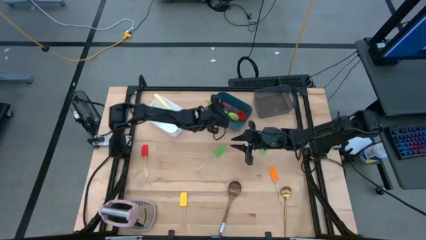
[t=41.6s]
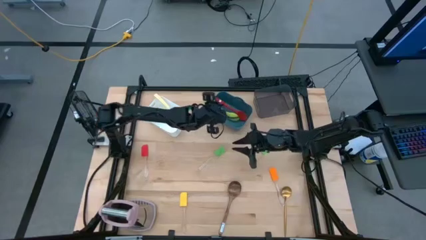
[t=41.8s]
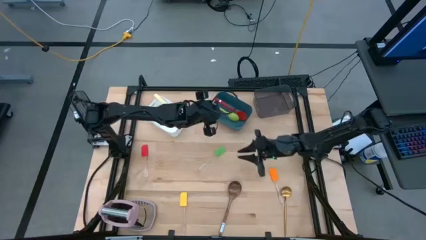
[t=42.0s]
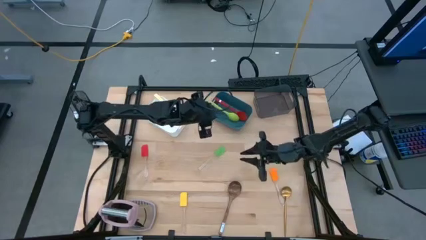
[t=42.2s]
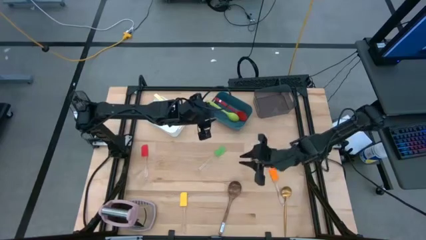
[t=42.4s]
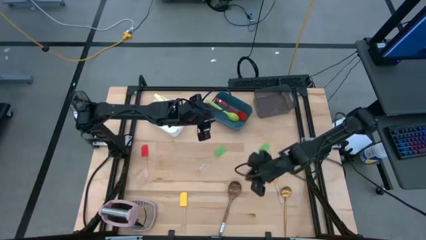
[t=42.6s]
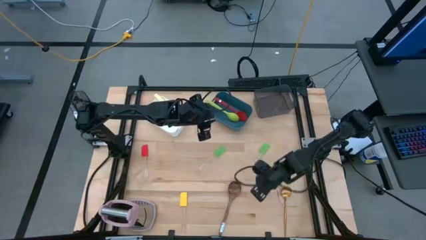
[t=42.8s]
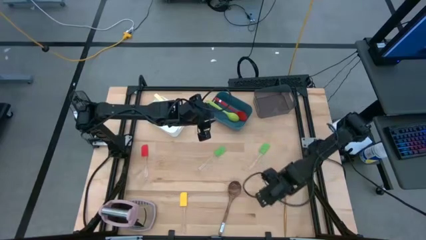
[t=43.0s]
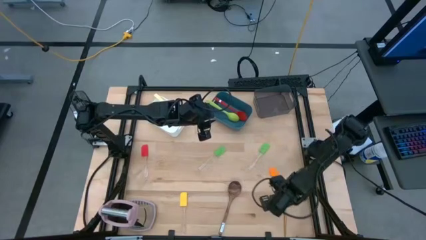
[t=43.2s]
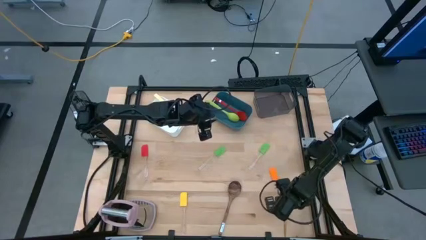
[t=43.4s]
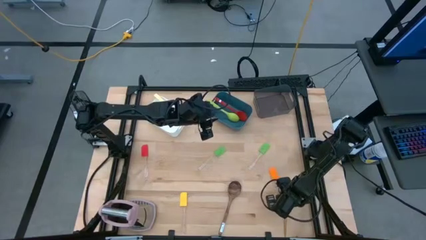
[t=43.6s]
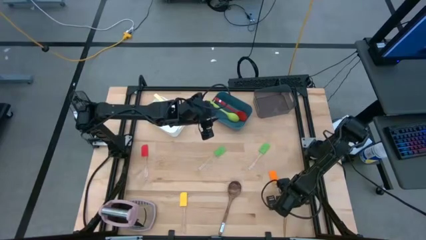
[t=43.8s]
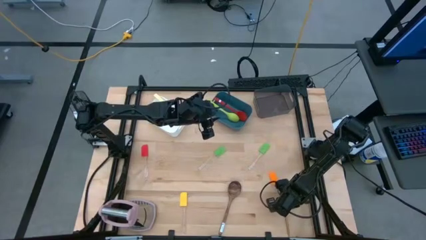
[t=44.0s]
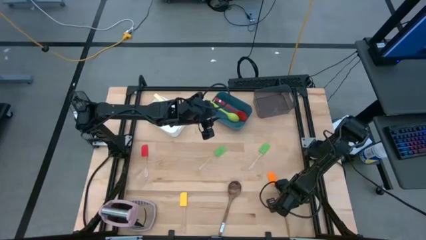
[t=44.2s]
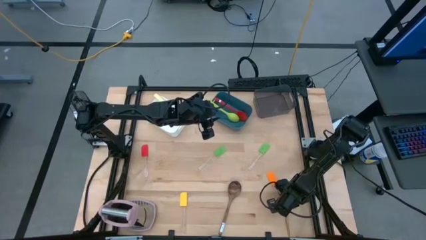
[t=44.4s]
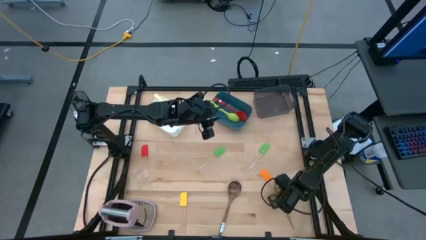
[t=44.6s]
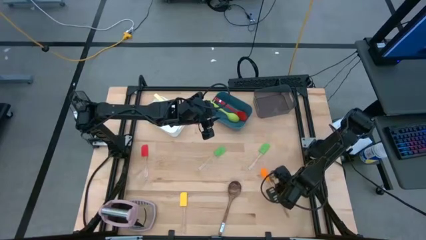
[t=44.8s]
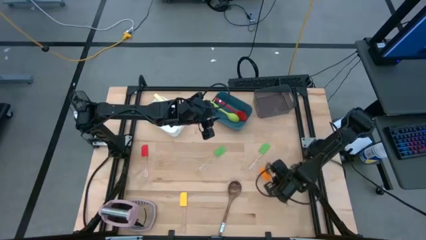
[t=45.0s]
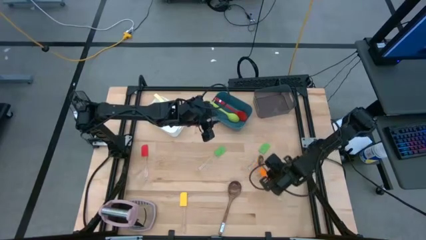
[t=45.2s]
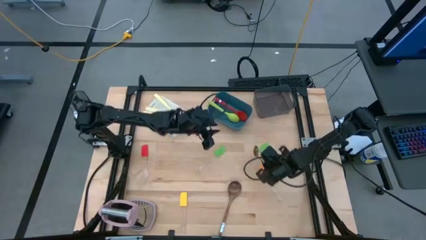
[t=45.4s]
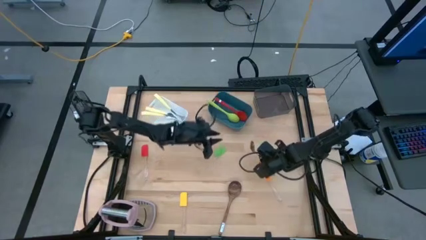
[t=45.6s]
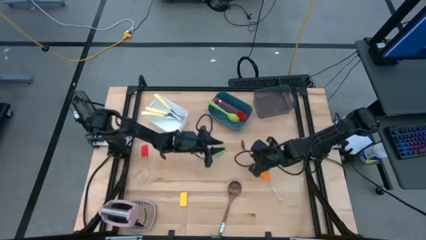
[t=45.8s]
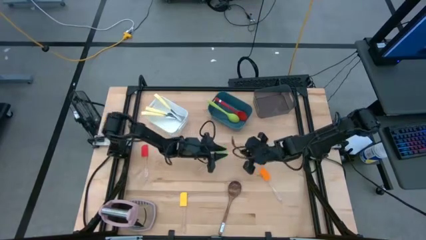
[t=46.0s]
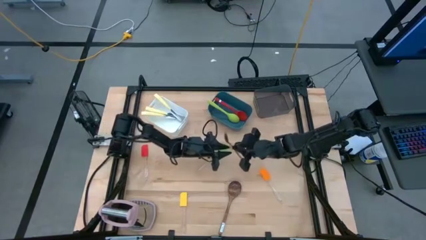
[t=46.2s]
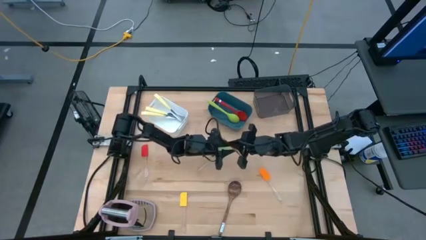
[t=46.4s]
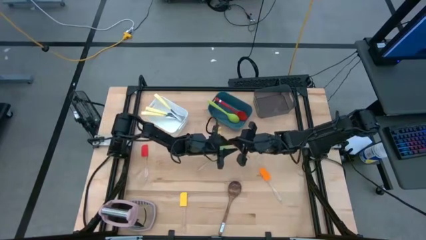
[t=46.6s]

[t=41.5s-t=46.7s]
Task: Pick & Place Kitchen Items
Put the gold serving spoon into the blue bin

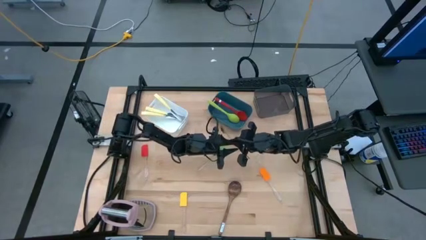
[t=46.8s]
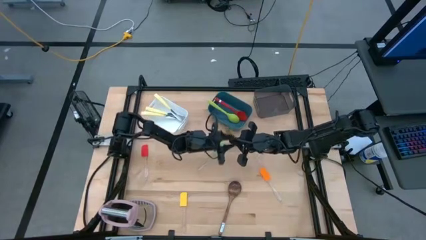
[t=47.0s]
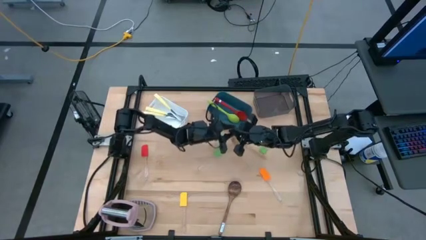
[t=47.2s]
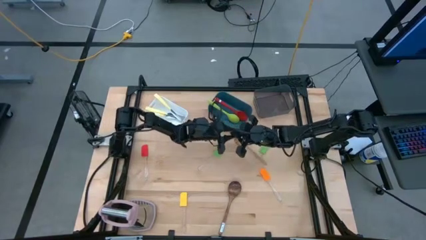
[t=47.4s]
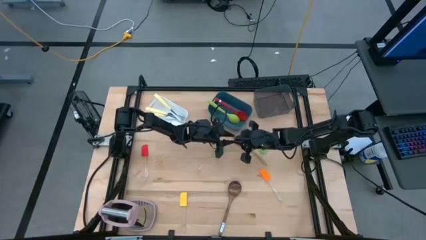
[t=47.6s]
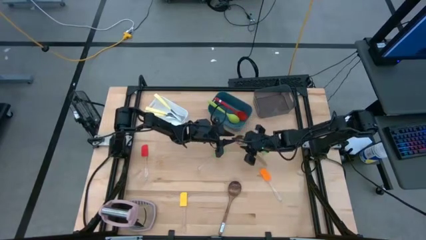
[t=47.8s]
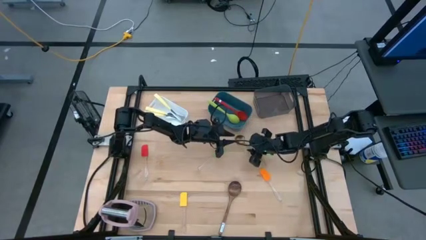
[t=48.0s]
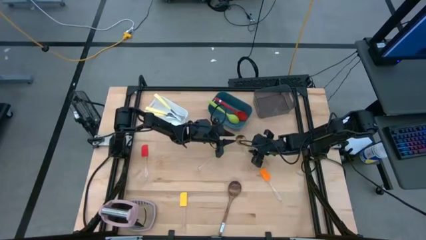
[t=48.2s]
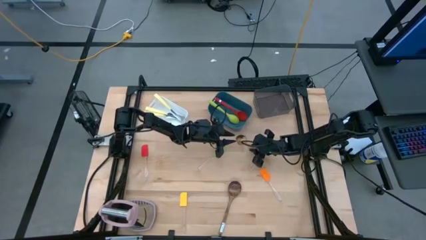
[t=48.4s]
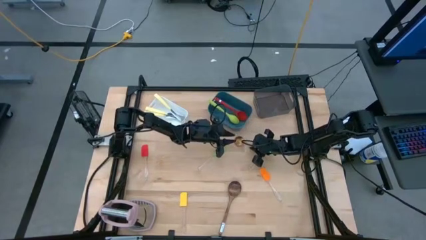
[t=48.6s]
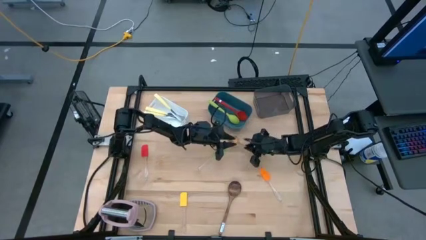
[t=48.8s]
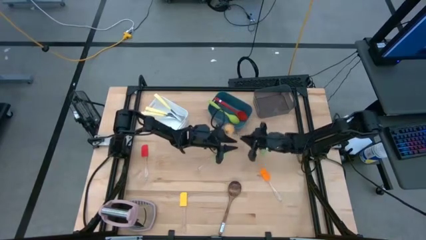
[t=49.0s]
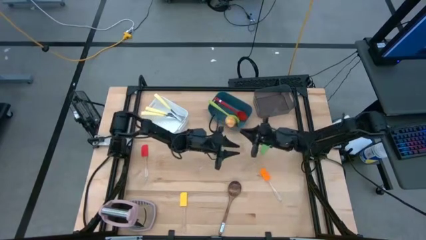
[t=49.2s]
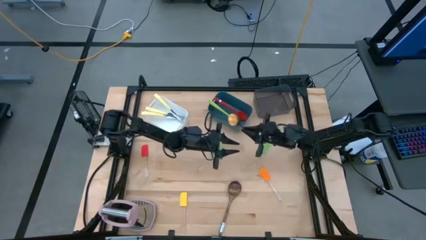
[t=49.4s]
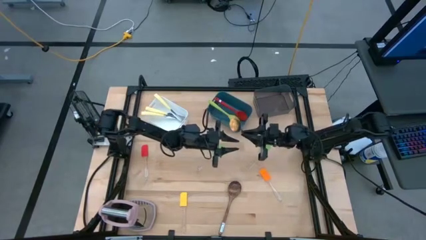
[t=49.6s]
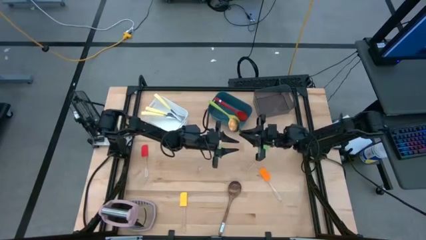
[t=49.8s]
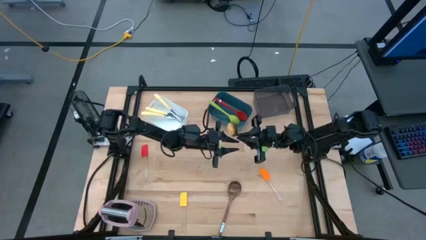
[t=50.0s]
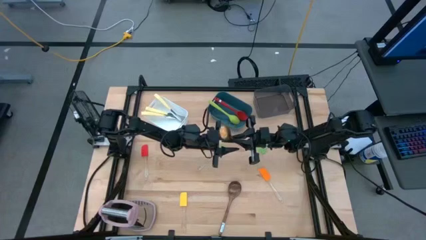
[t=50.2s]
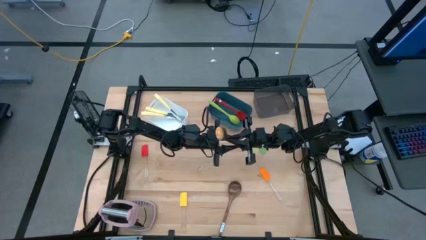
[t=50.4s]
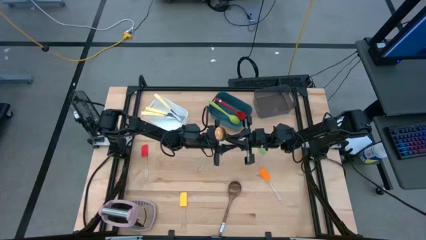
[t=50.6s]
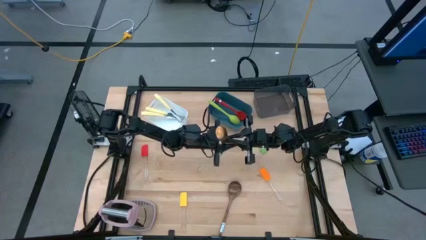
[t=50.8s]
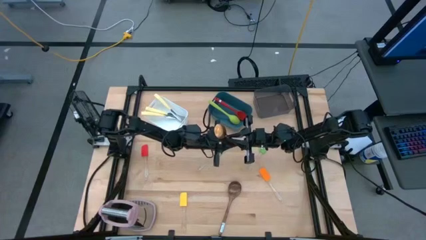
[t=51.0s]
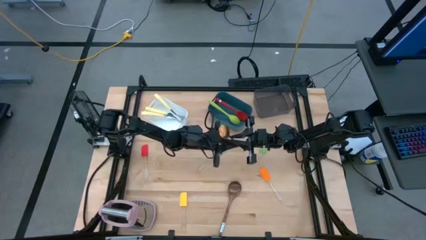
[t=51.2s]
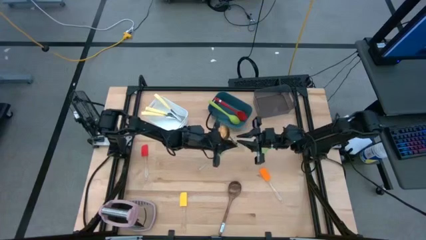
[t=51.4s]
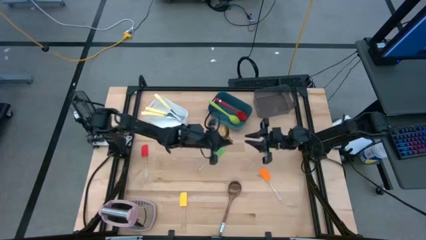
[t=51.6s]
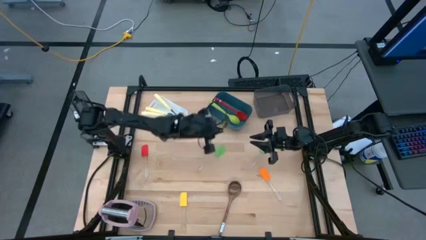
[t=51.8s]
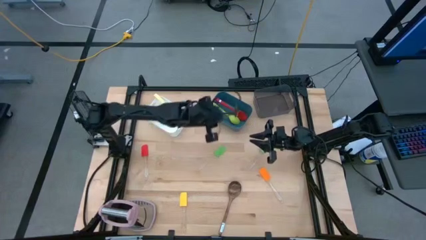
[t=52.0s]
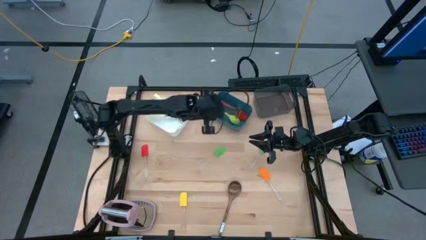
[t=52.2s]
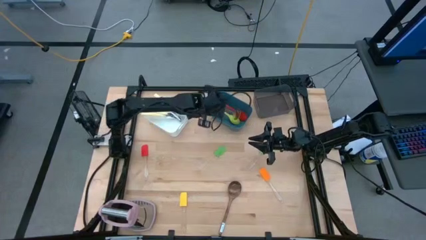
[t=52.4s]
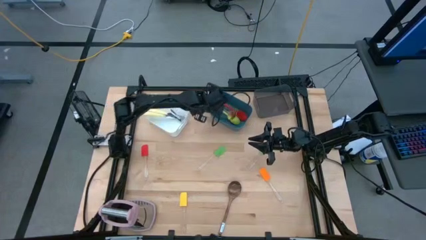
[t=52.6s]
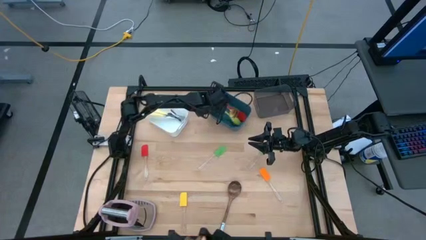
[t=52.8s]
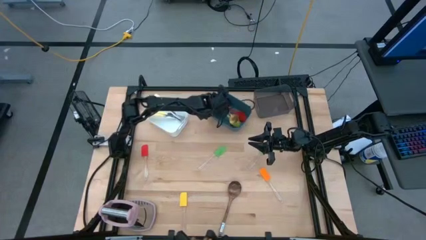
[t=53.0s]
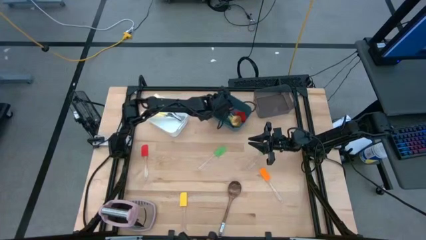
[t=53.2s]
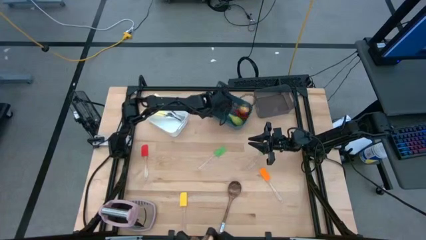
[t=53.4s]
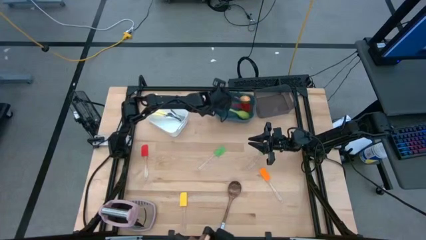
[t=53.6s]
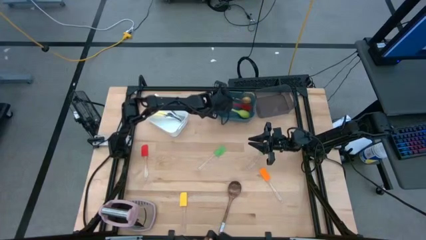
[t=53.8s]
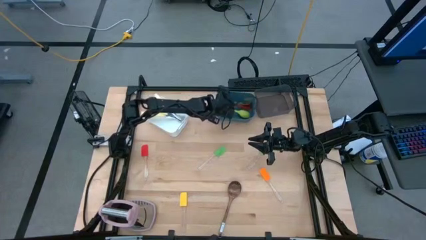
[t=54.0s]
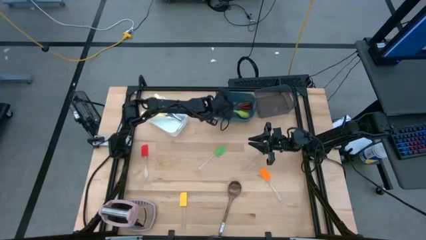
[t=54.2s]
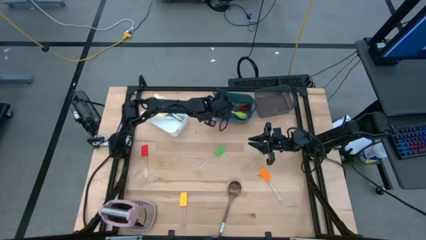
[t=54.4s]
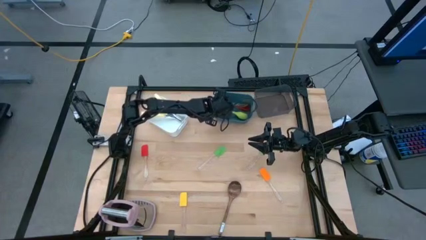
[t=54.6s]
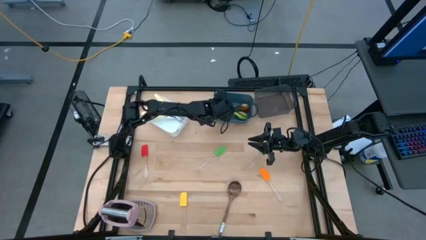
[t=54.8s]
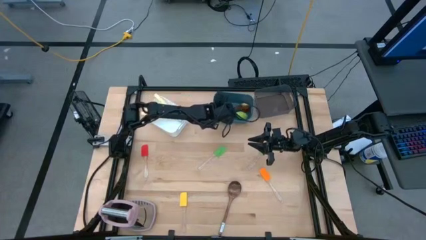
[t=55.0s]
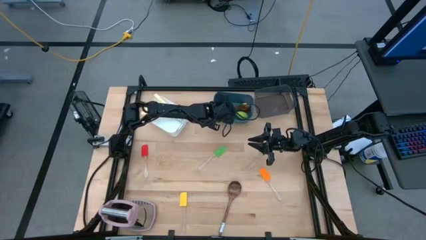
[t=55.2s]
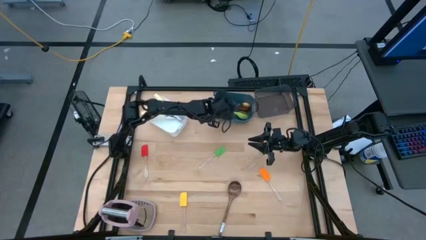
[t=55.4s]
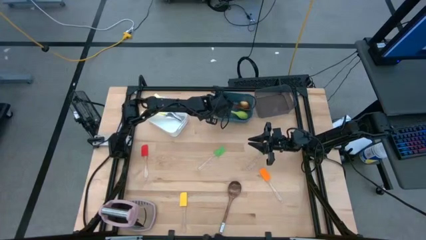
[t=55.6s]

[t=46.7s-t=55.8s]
Put the gold serving spoon into the blue bin

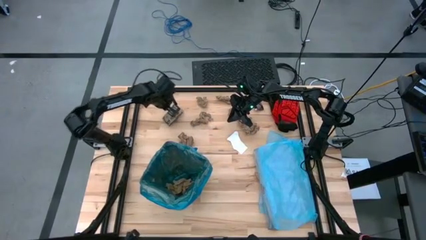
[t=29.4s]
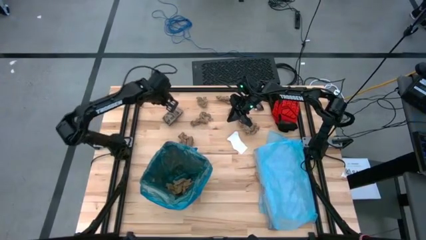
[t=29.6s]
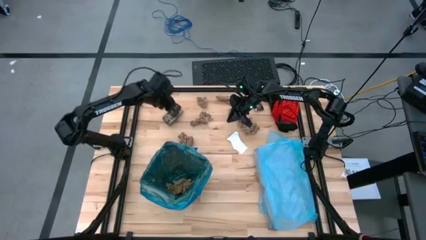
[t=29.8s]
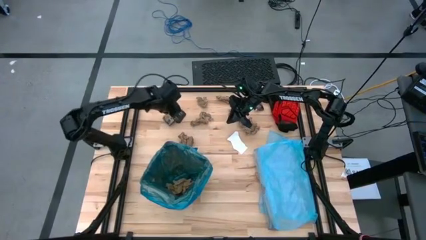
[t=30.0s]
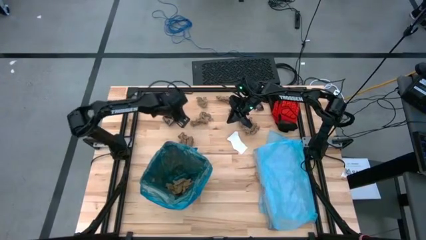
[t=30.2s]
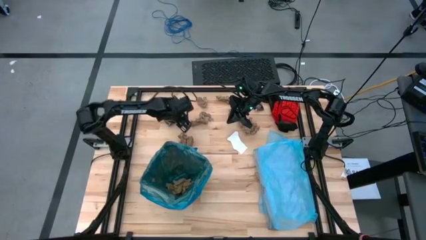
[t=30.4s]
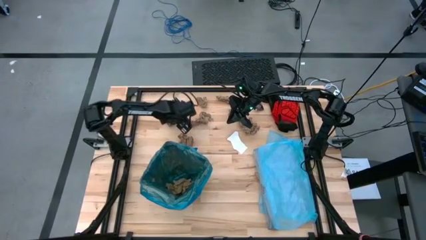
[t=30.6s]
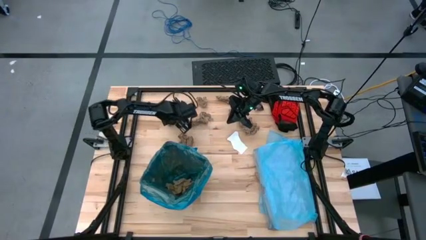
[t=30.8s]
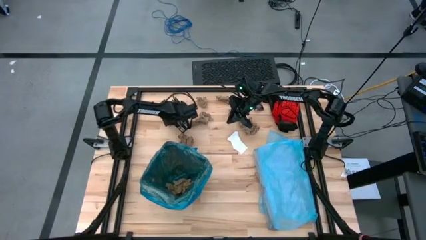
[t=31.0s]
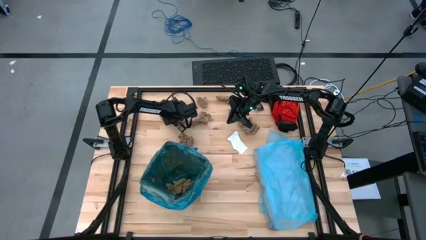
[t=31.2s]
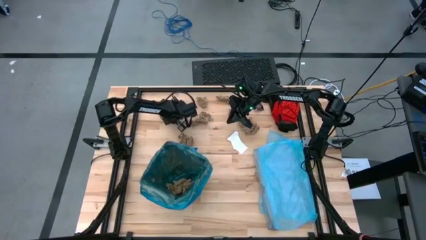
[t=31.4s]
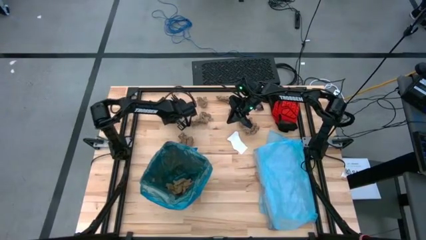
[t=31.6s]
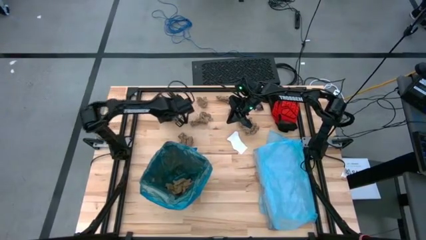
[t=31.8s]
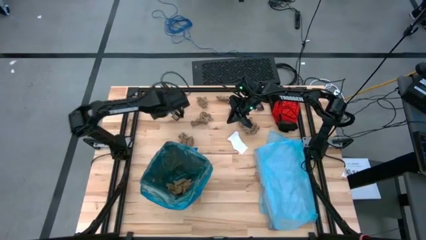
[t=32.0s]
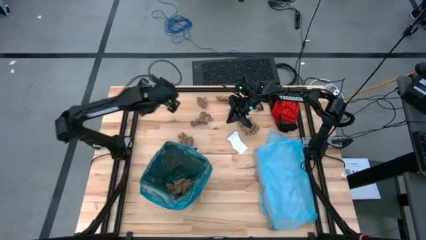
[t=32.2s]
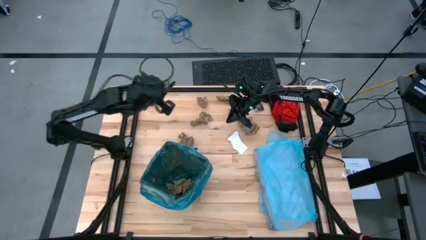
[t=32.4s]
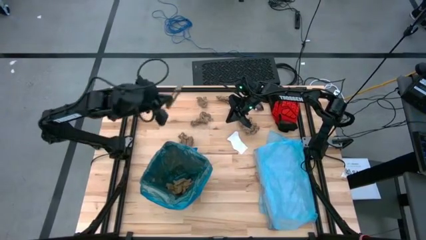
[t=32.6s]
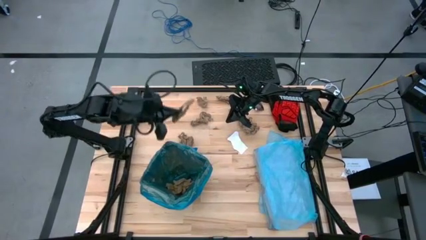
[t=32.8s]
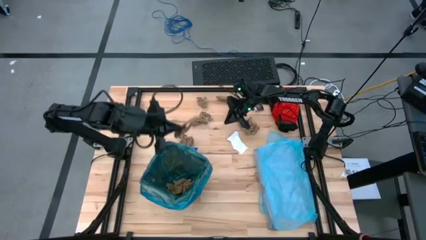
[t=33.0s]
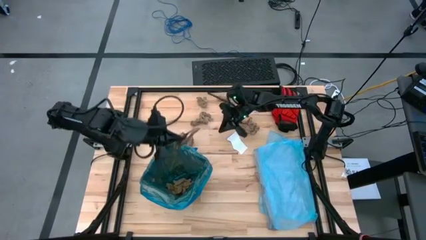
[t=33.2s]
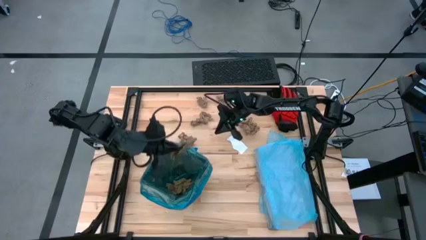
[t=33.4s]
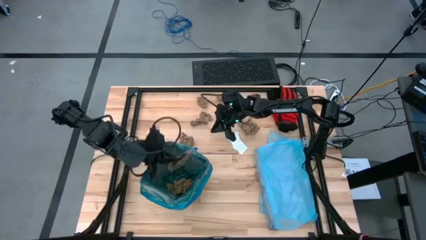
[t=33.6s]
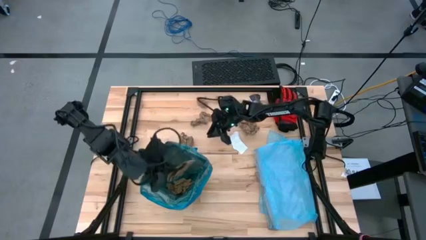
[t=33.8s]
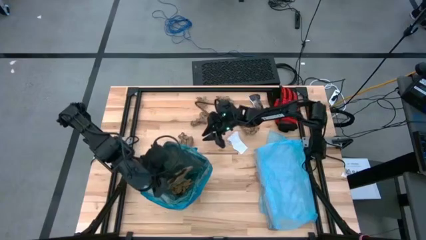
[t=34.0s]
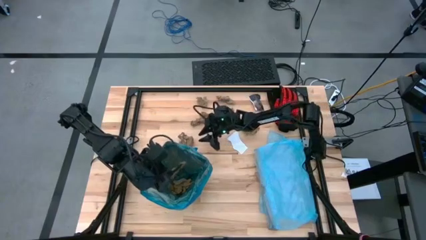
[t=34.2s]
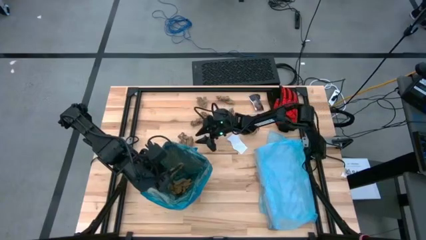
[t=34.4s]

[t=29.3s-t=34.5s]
Task: place trash/remove bag and relplace
Put the cardboard piece into the trash bin
